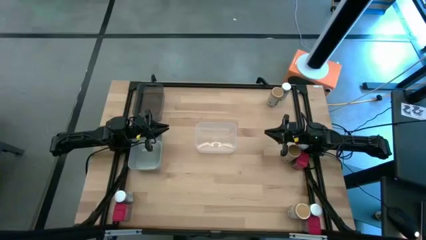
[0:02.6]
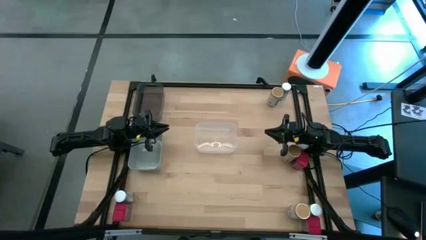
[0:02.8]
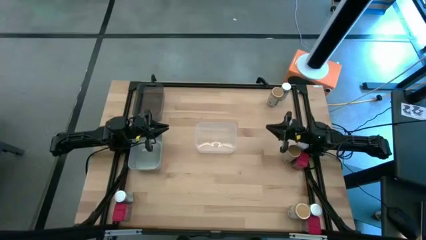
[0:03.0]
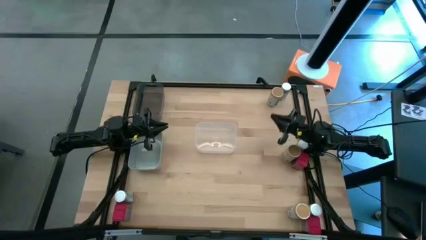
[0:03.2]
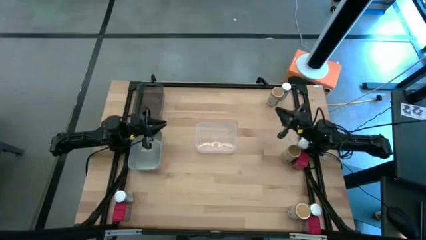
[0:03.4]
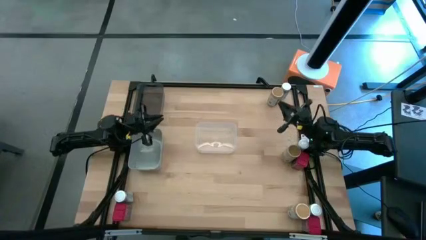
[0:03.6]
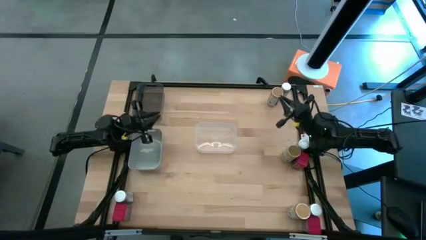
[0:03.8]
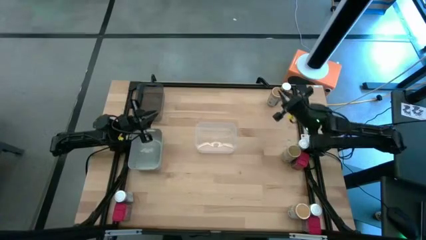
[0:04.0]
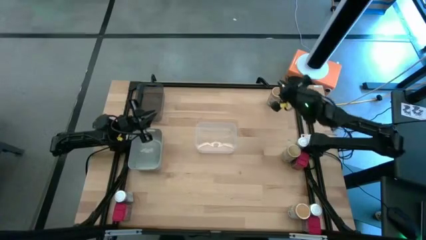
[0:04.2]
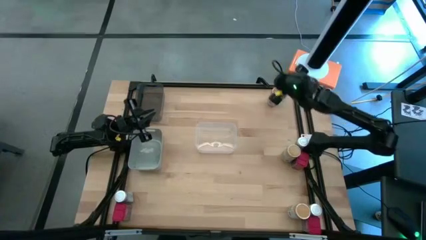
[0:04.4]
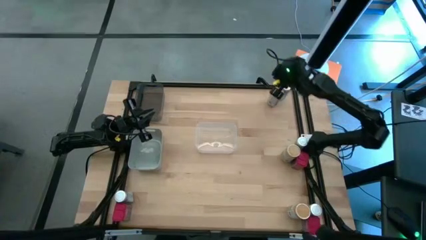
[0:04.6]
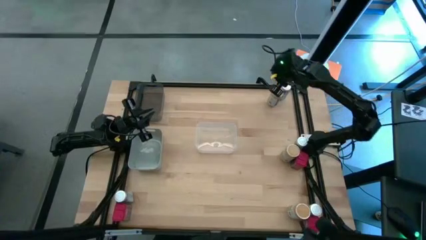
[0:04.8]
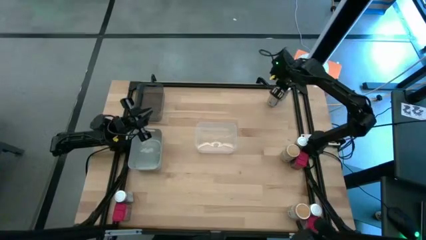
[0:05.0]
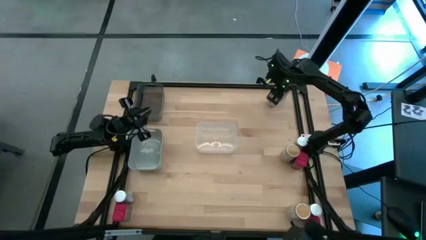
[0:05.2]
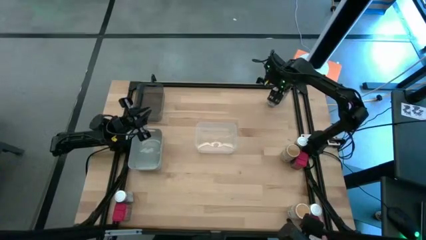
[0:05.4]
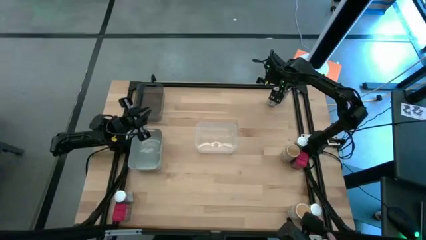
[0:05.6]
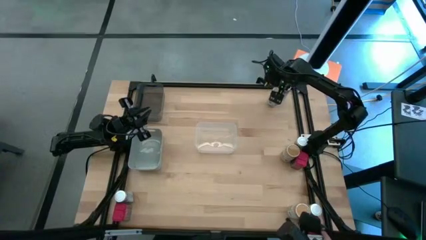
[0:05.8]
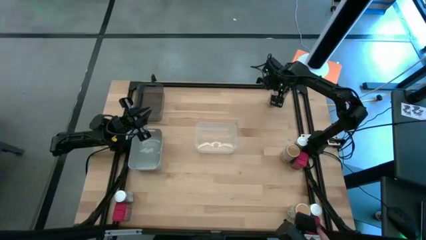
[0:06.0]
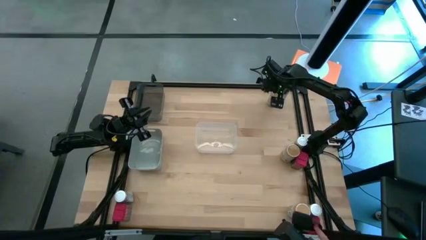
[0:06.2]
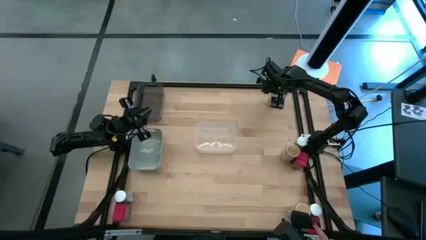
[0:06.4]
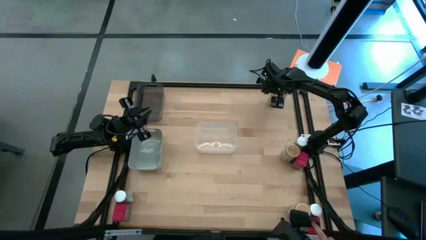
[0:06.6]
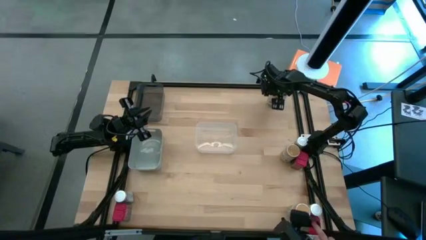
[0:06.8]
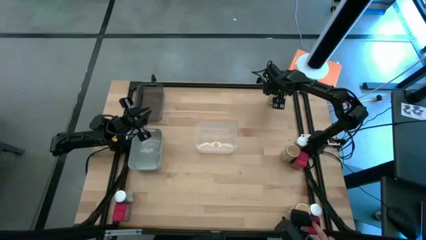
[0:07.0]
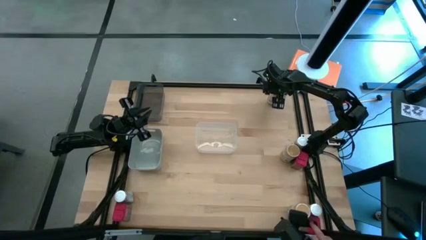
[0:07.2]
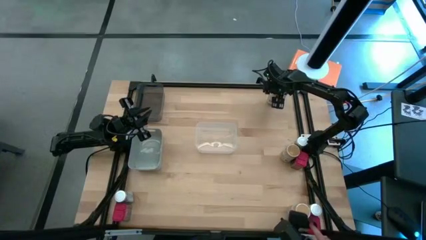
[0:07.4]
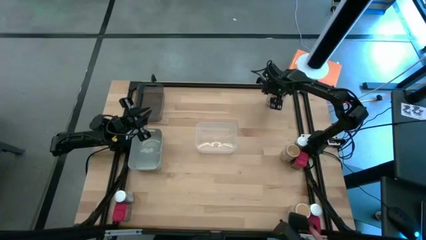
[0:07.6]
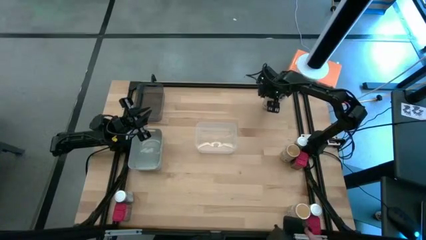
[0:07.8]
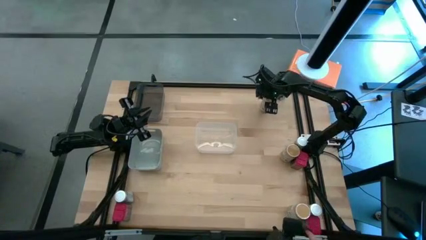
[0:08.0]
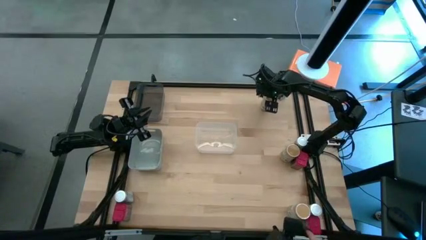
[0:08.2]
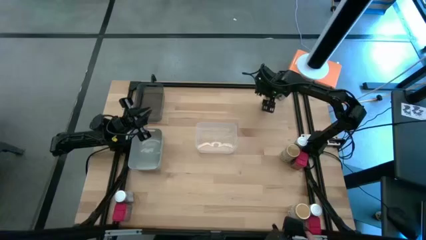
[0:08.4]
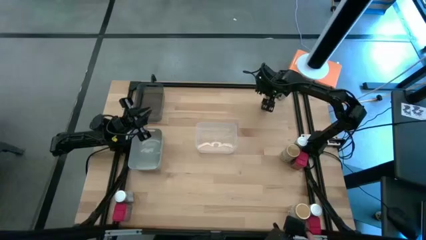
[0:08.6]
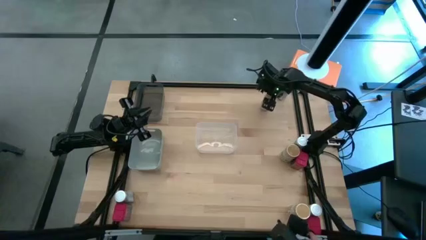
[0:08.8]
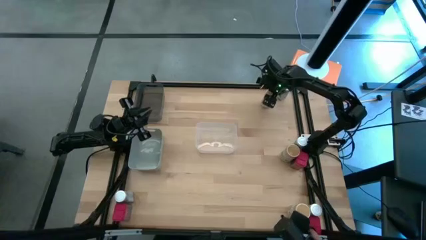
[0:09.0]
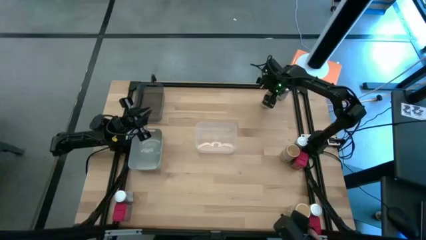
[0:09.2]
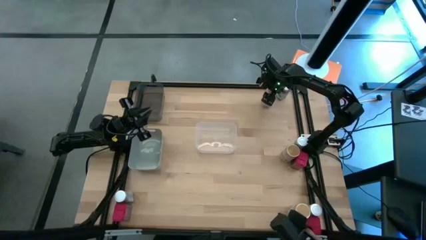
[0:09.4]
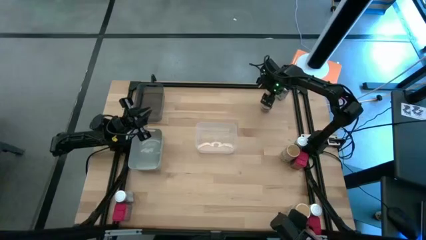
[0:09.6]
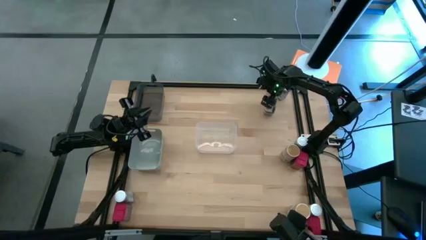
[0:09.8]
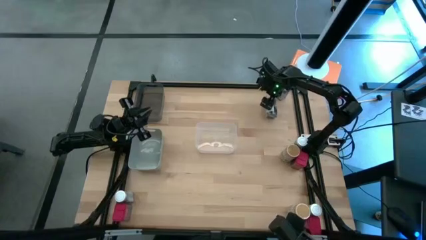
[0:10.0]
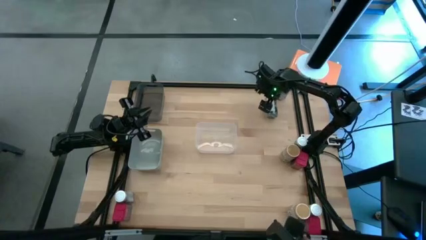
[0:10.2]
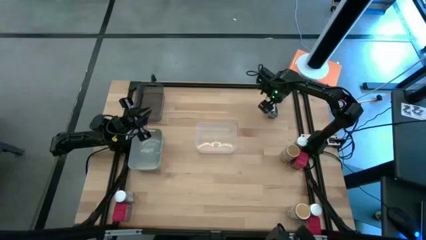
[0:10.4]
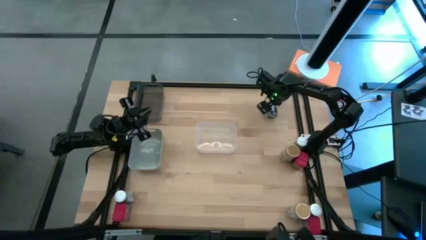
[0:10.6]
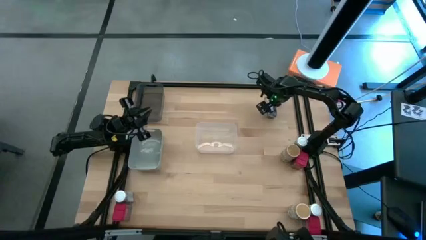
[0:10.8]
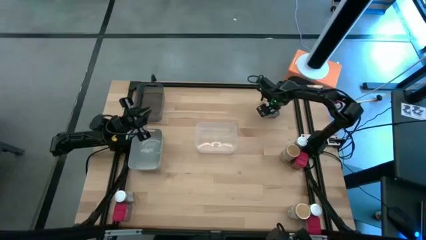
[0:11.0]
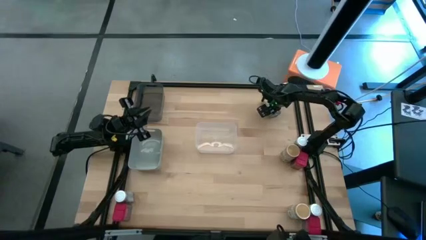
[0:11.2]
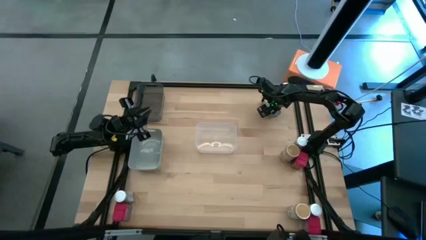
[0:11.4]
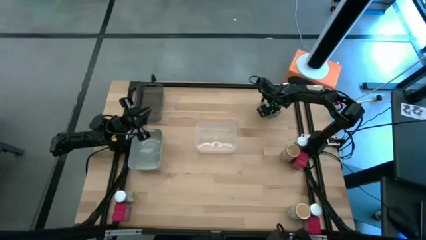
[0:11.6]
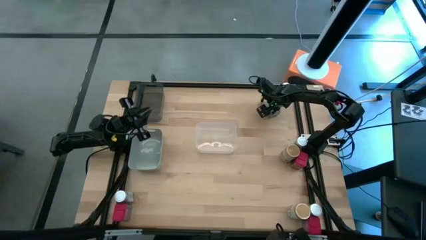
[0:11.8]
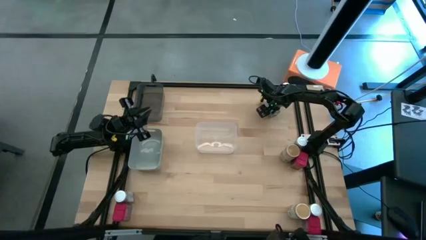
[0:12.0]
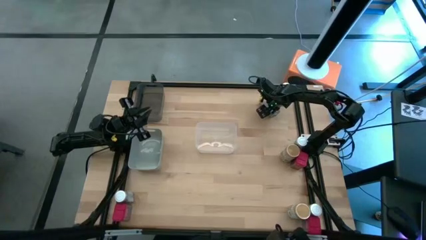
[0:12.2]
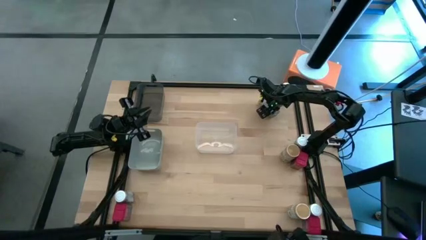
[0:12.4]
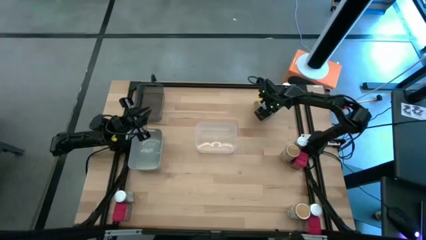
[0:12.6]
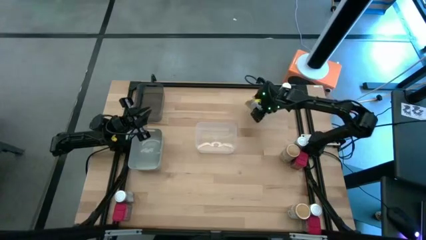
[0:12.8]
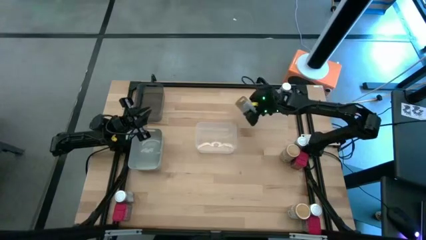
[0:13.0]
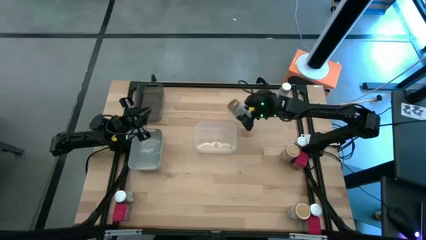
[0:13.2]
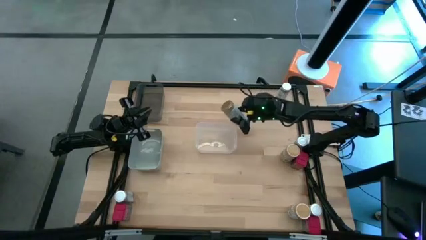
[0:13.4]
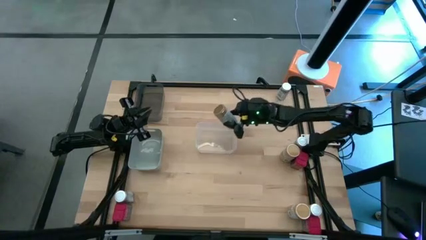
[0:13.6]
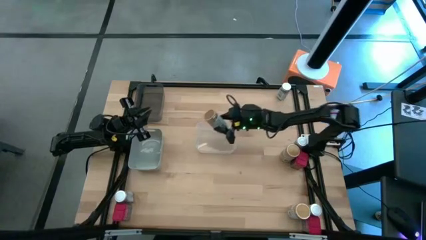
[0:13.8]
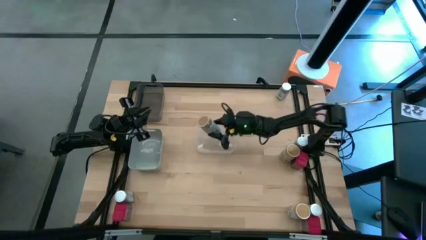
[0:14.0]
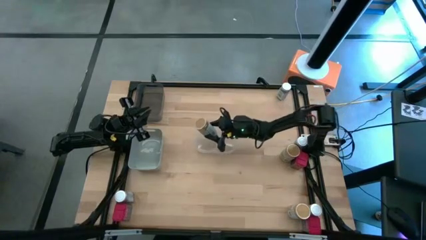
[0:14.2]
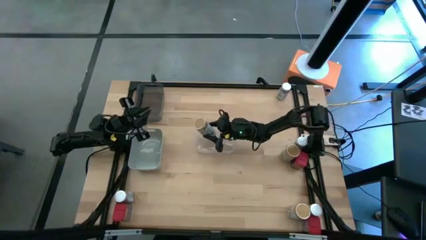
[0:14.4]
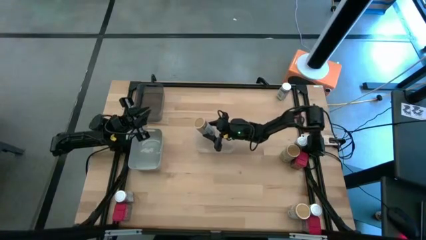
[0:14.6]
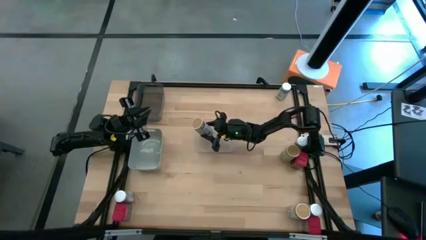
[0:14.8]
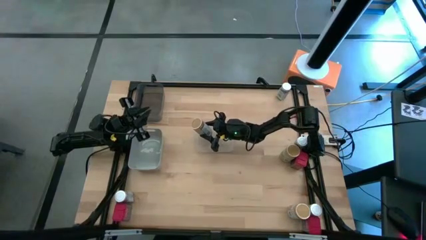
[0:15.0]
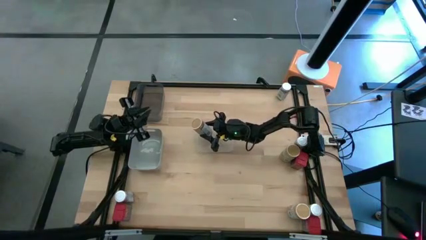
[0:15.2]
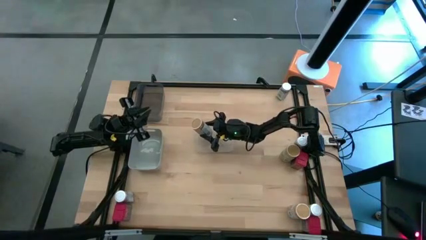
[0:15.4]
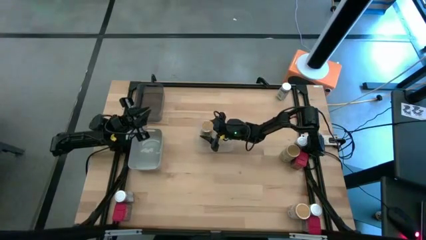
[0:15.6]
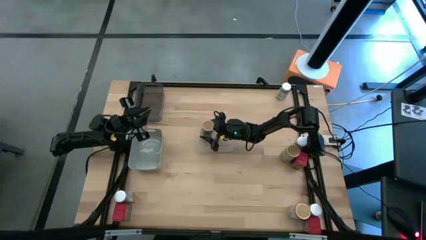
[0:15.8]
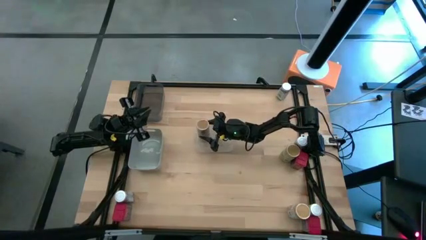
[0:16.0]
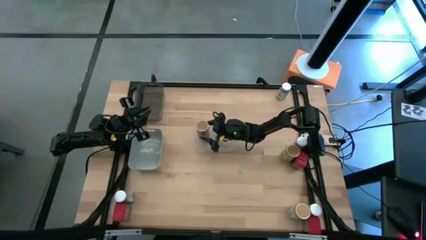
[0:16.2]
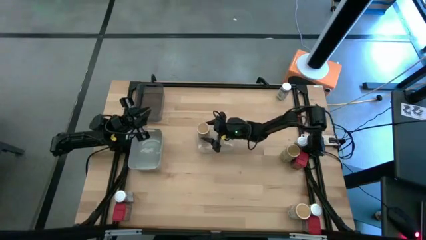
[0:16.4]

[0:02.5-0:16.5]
Task: Sort spices by type
Put the top right brown seasoning bottle into the transparent bin

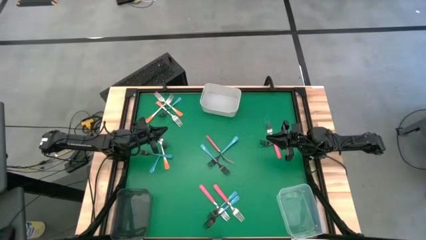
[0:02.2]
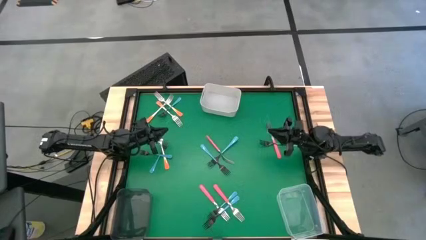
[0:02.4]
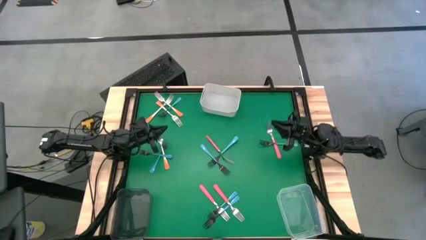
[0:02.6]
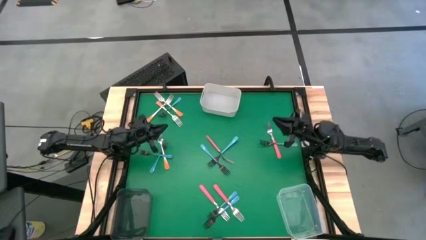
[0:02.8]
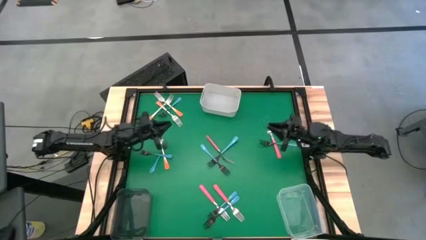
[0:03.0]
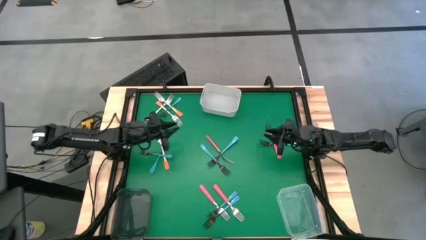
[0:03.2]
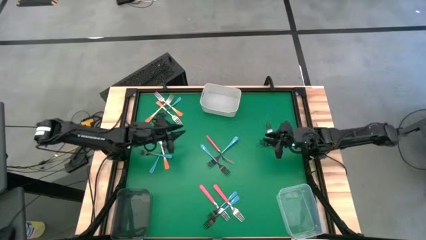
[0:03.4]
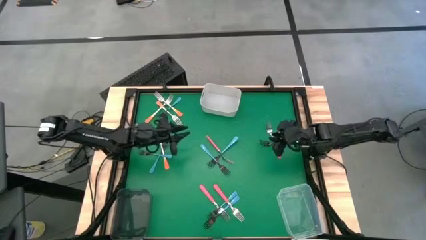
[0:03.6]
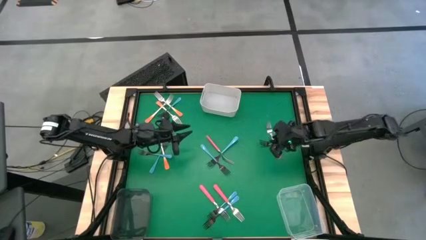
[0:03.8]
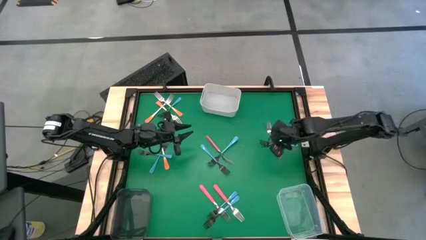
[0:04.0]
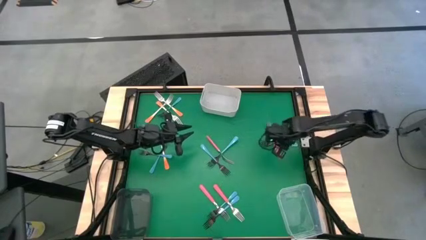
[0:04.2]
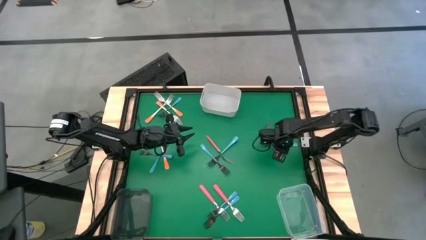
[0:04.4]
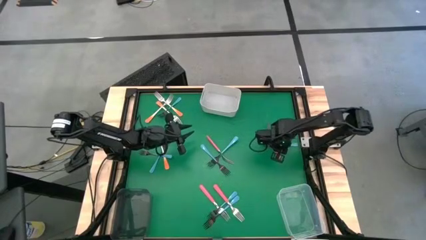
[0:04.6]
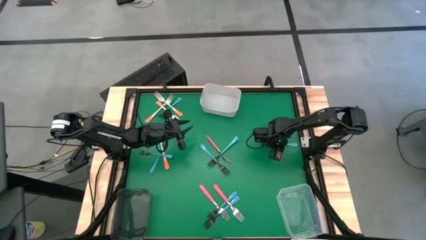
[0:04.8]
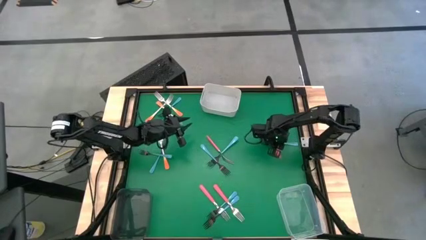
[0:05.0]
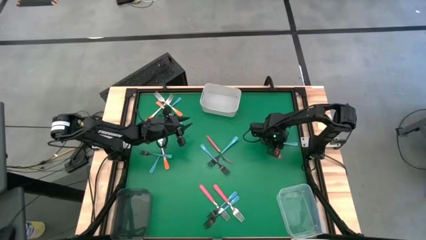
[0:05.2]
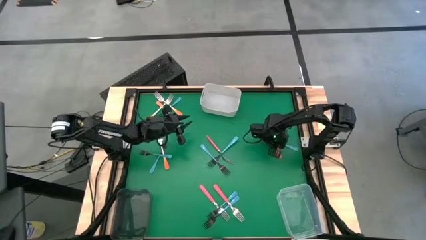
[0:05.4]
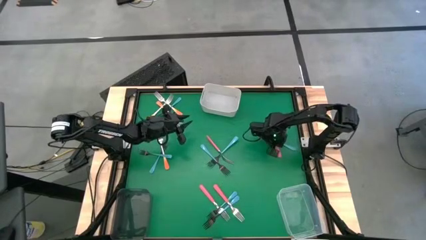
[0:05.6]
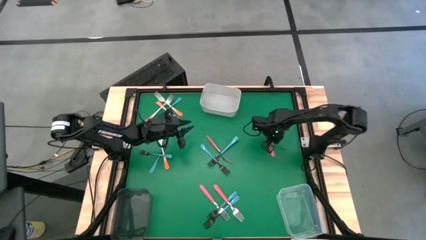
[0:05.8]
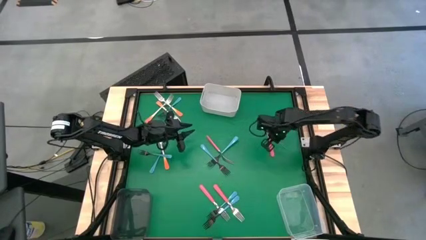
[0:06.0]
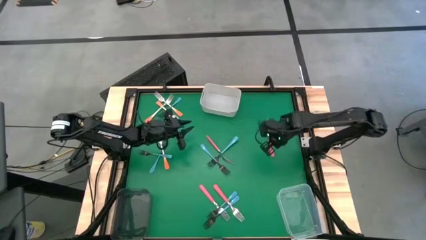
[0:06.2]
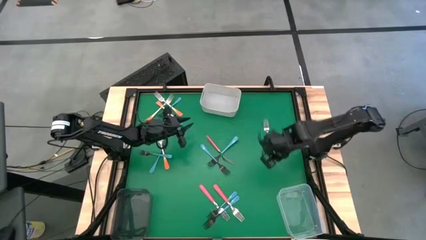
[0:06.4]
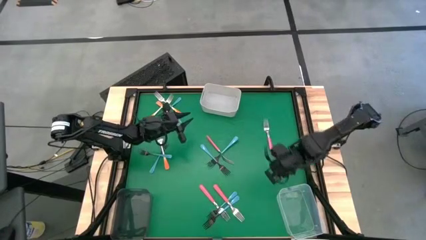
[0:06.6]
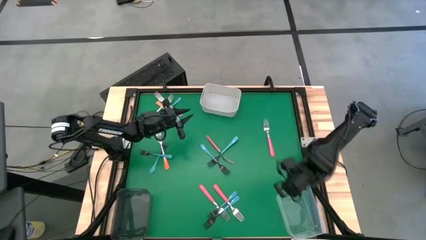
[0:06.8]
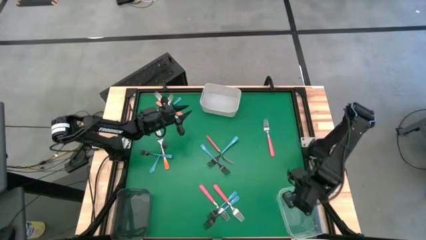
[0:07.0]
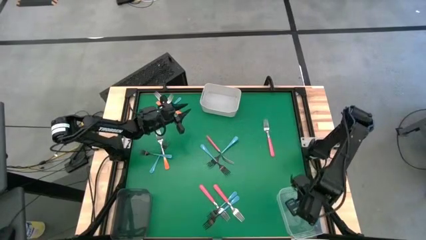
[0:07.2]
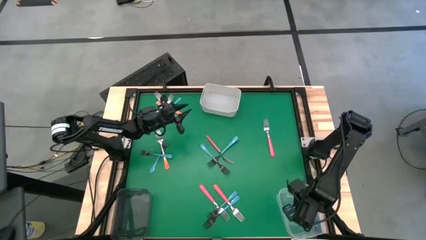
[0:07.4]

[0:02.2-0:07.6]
Task: Sort silverware by color (type)
Put the blue fork into the transparent bin
